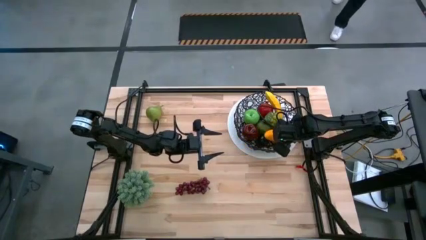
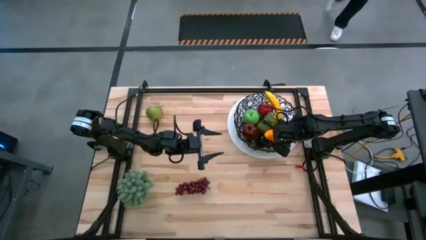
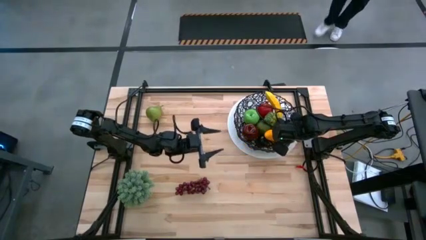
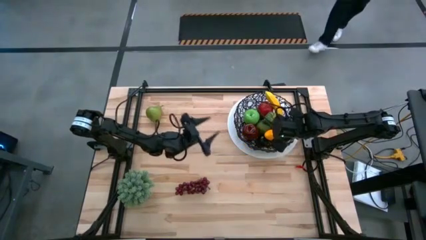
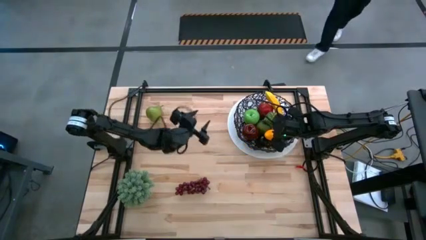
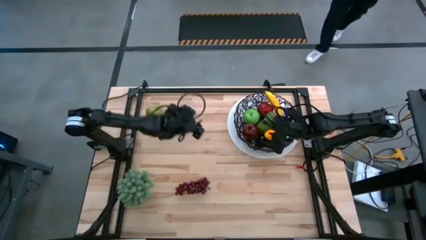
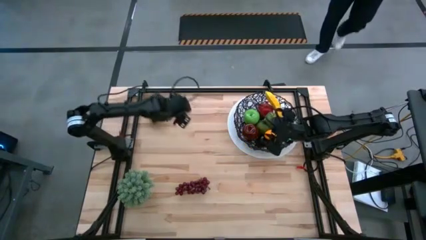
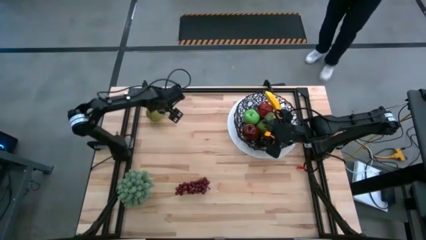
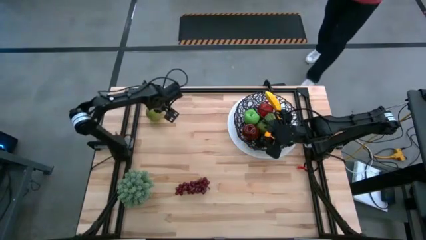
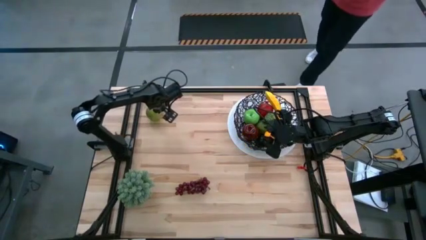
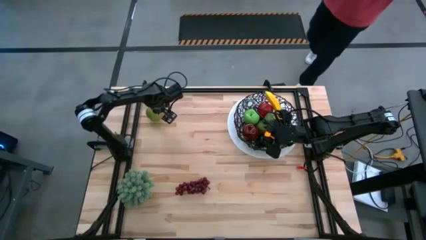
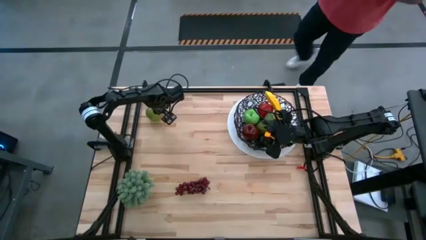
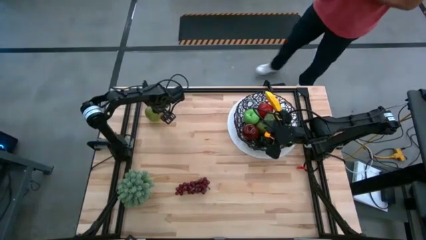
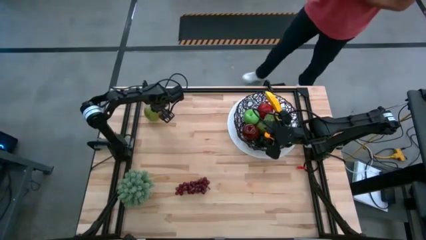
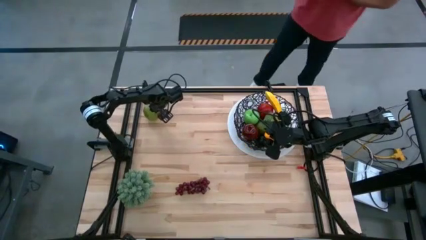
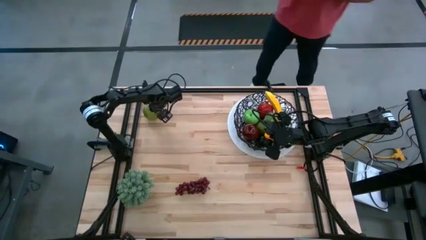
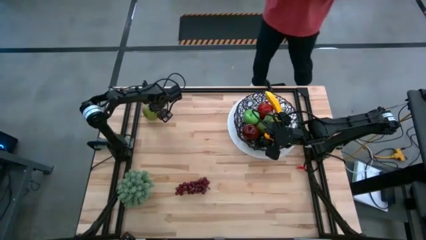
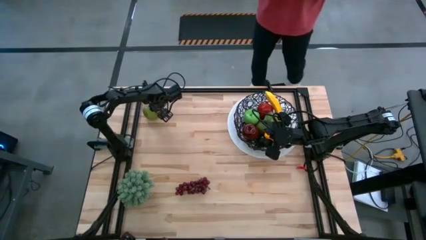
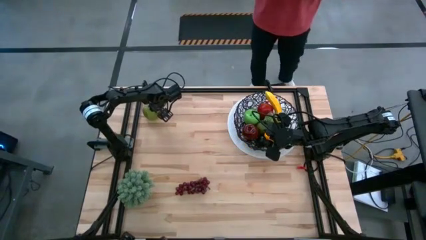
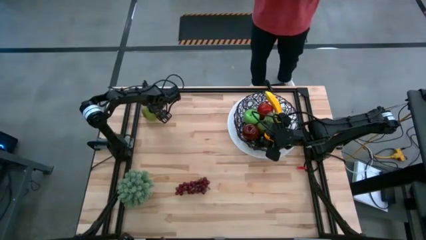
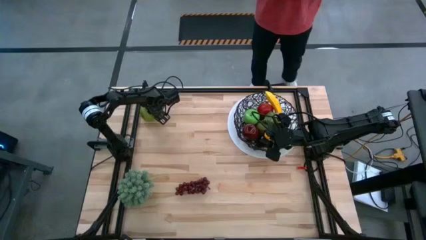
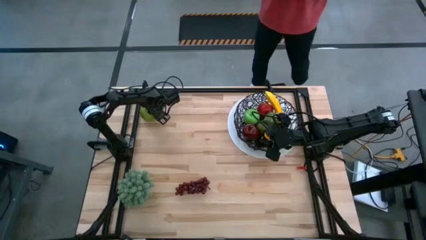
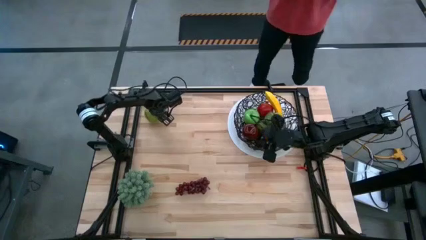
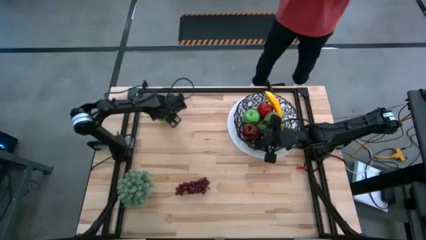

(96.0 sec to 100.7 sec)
Task: Build produce basket
Put the green pear into the wire basket

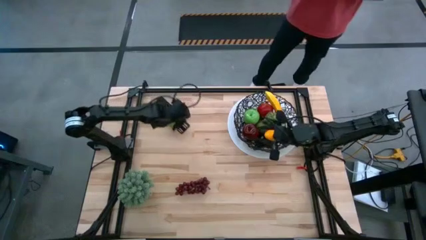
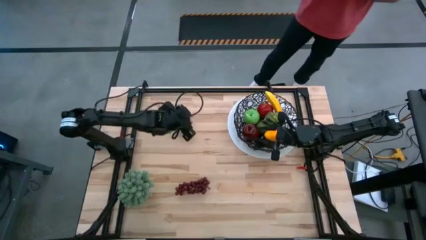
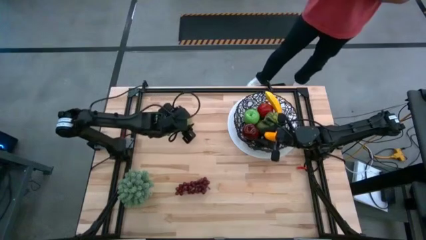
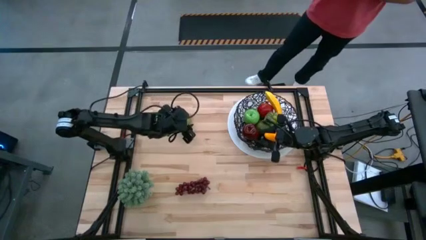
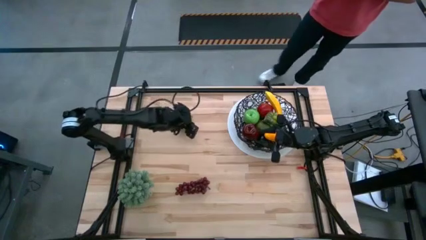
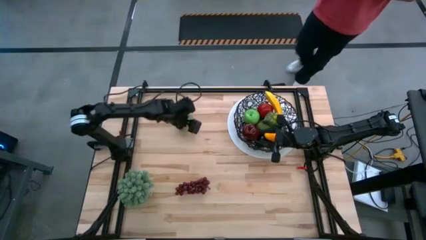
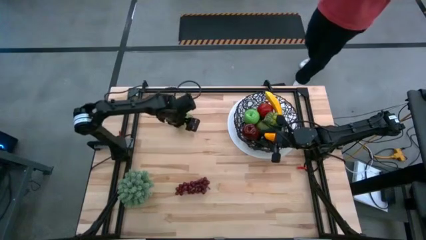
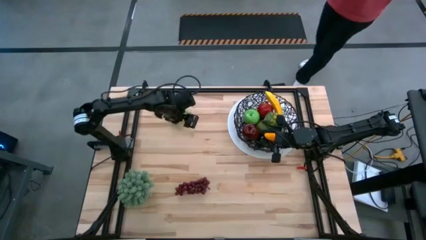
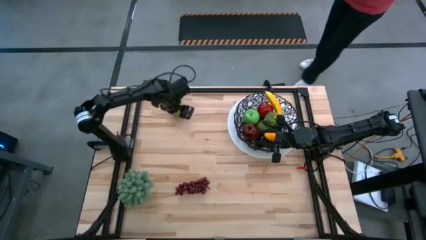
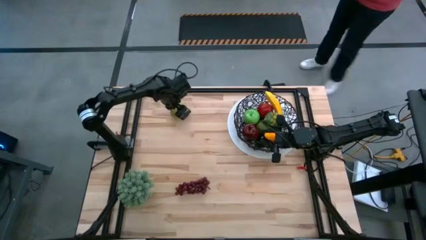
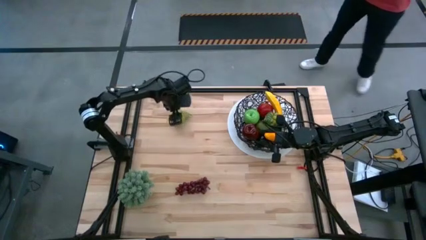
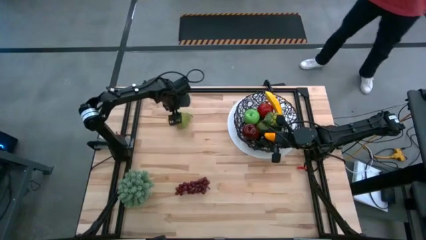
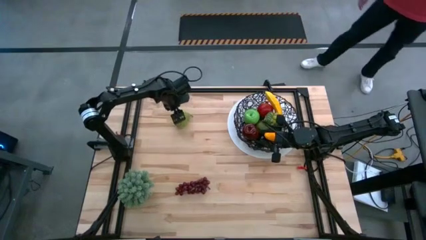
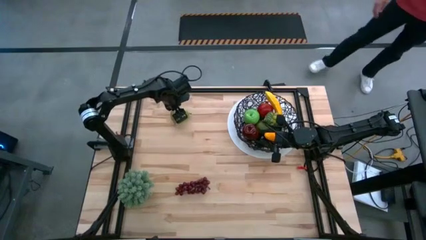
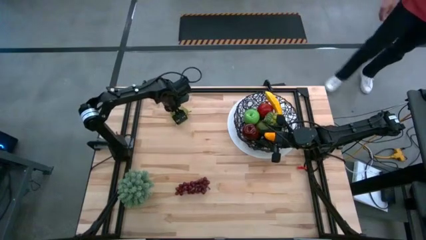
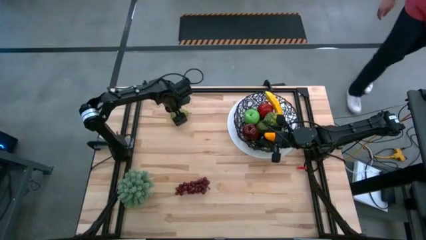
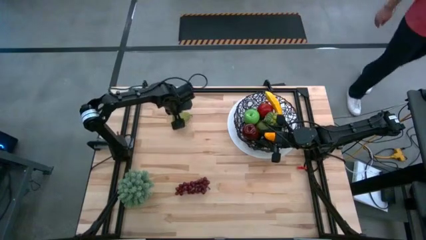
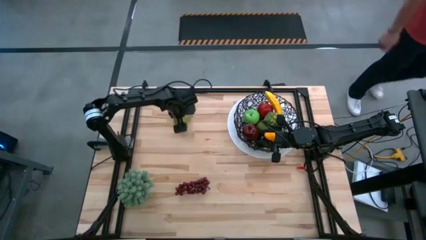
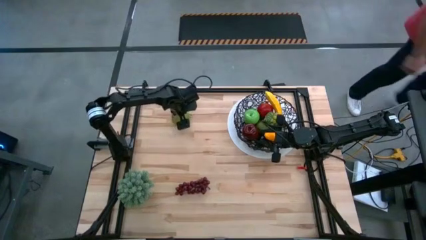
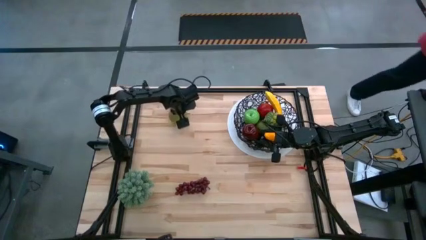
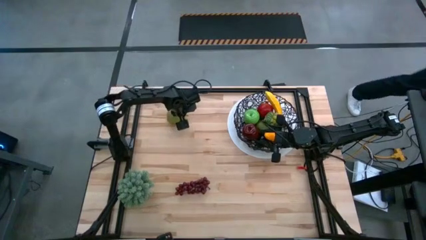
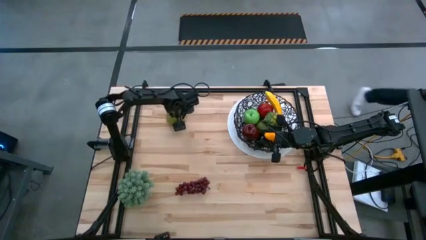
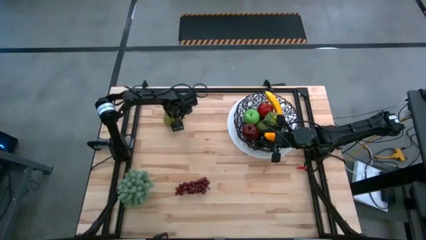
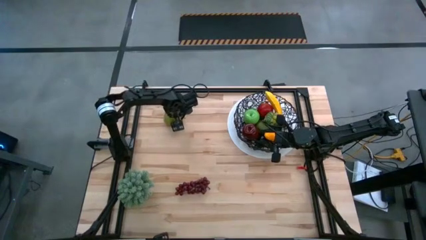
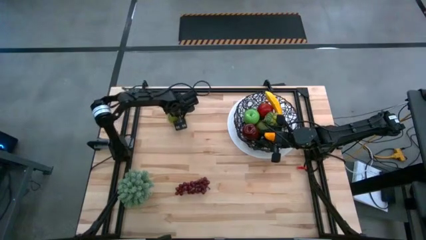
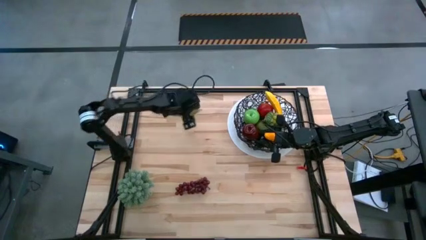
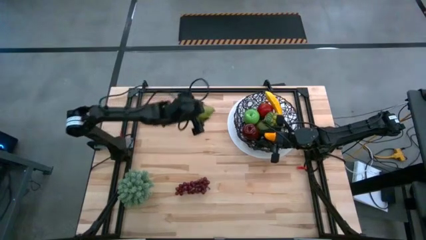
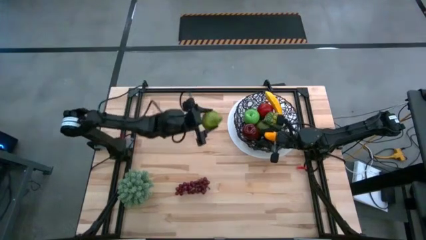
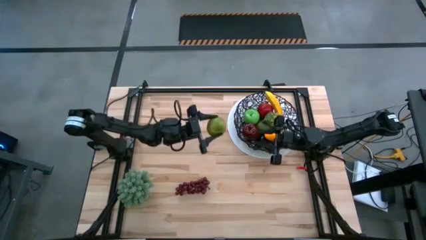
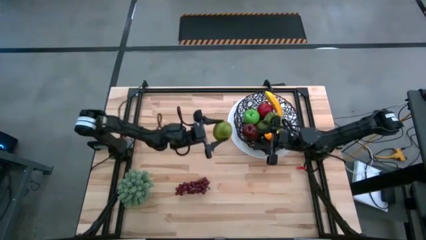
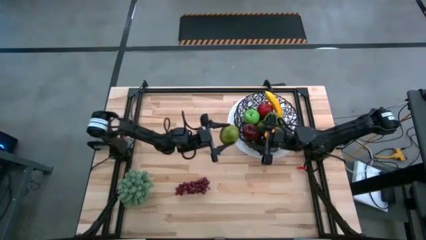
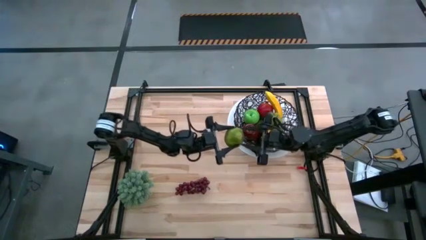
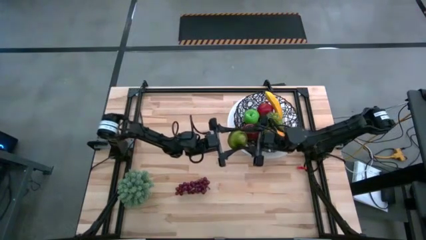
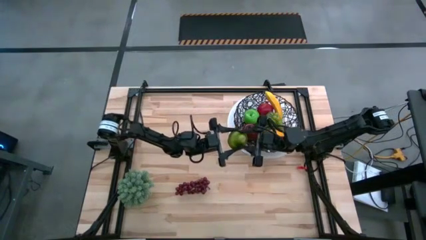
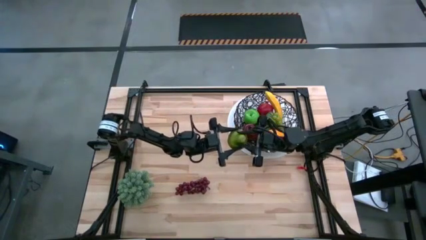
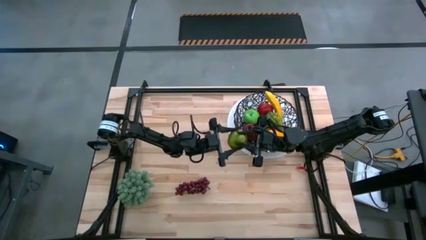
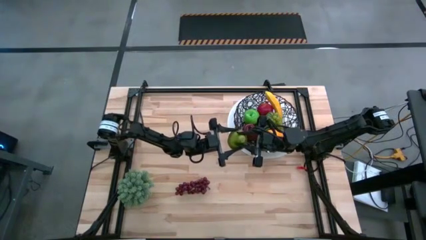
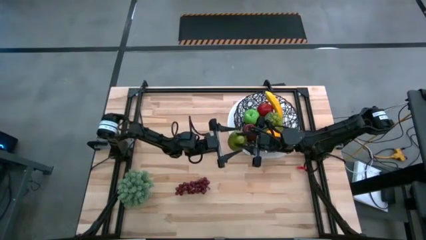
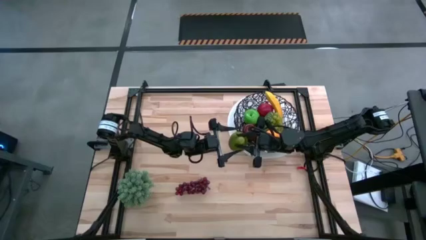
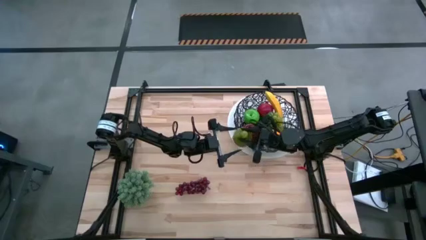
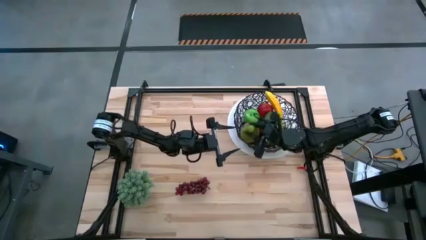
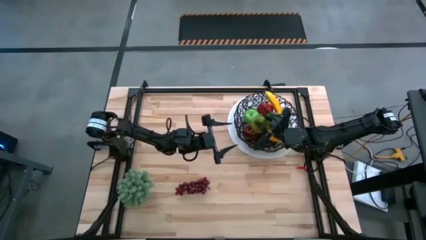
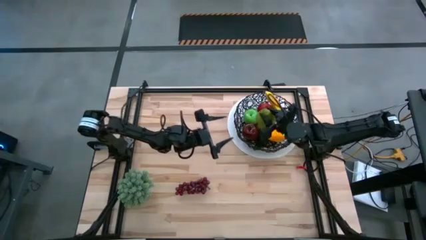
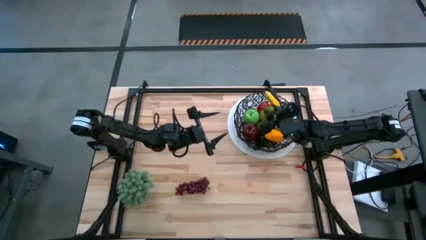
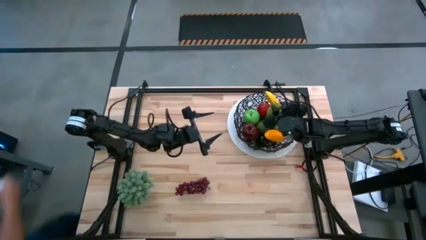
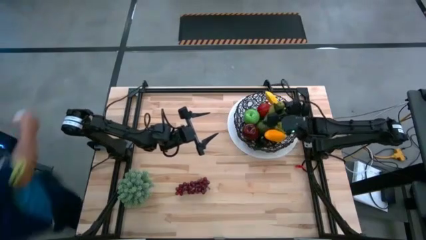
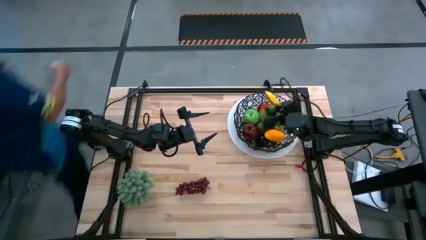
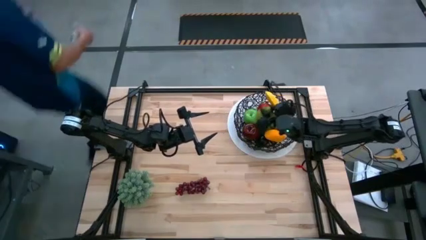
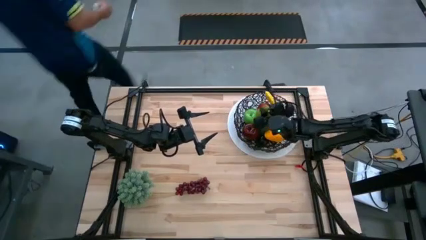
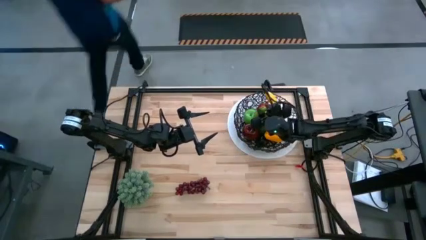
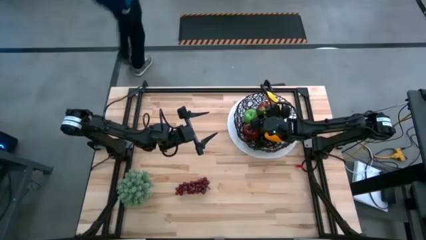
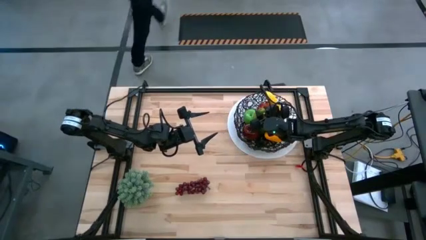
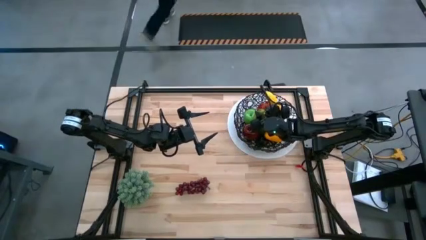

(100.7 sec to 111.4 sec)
Put the green pear into the wire basket

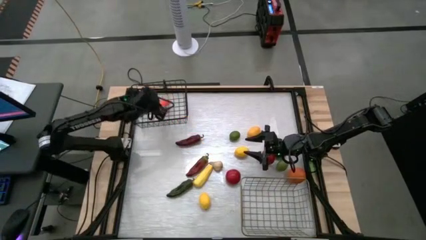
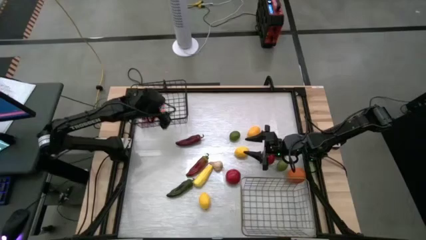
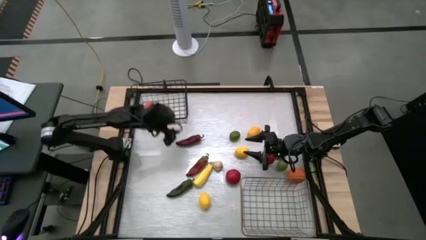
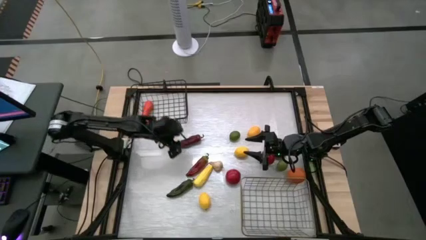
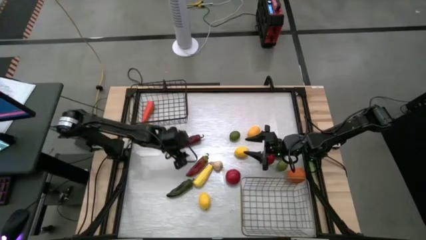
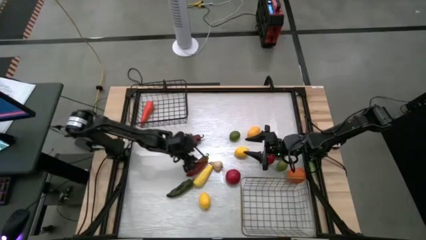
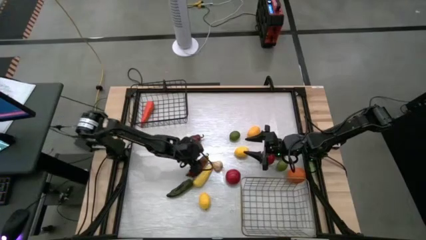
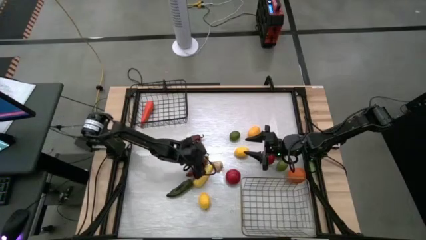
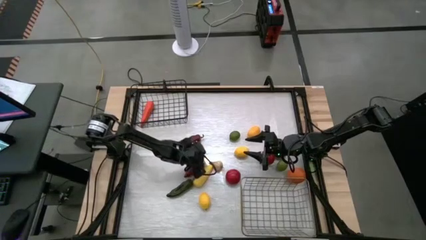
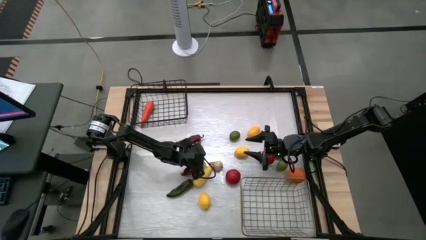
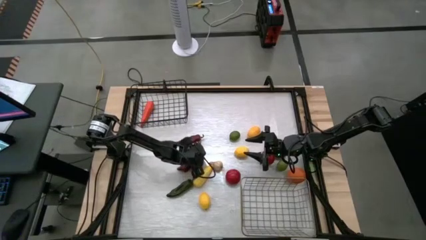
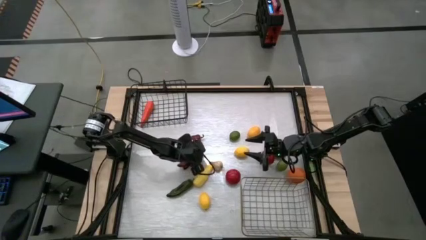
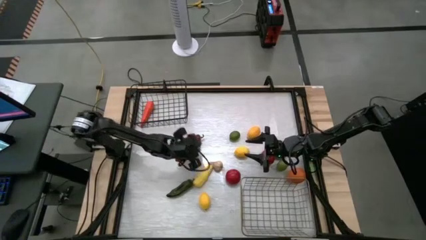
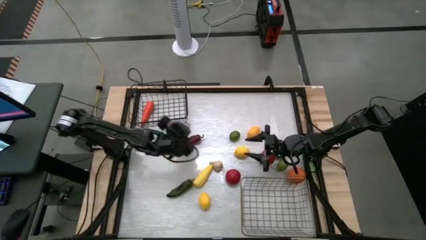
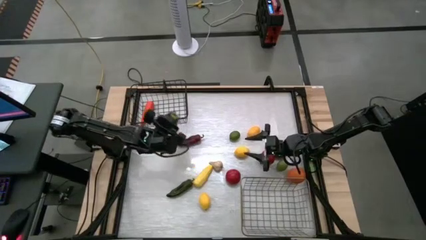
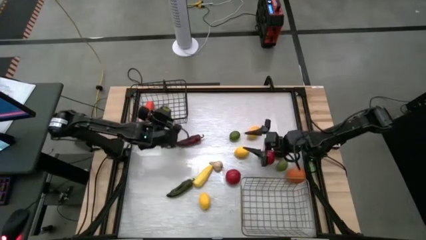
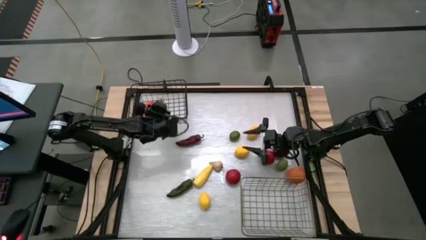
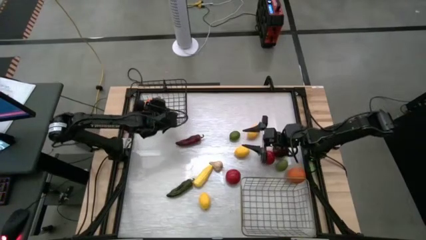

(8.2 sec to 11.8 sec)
Task: Sort produce into baskets
Put the bottom red bell pepper into the black wire basket
